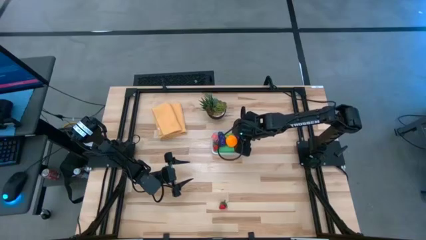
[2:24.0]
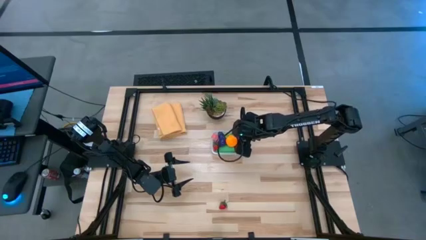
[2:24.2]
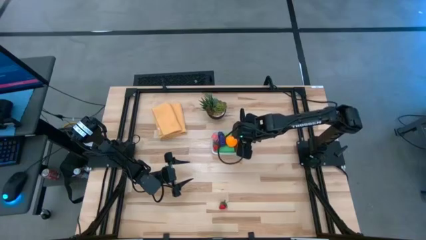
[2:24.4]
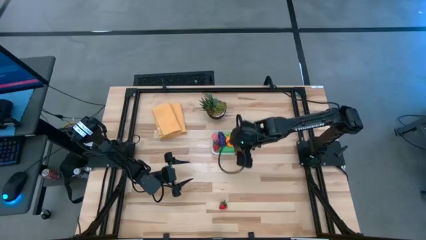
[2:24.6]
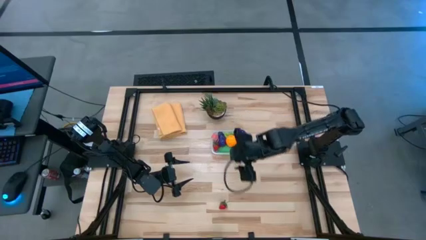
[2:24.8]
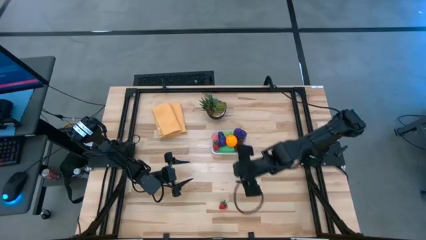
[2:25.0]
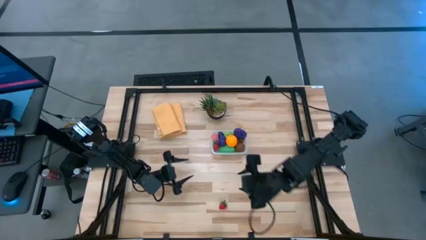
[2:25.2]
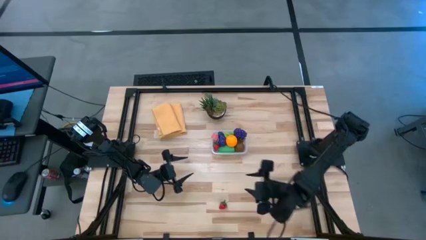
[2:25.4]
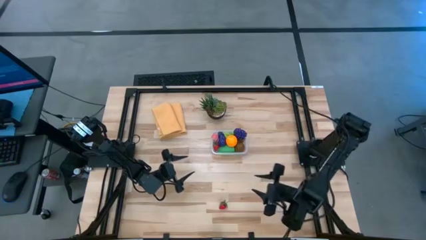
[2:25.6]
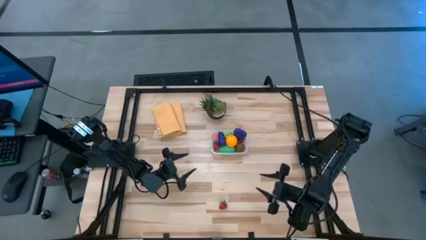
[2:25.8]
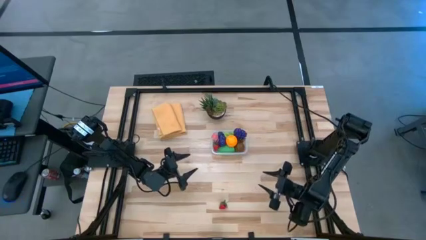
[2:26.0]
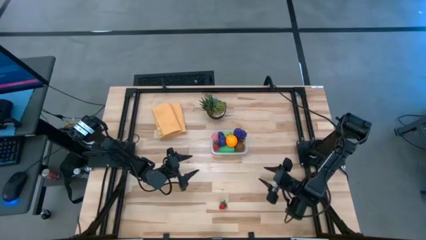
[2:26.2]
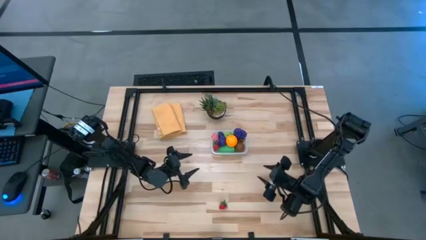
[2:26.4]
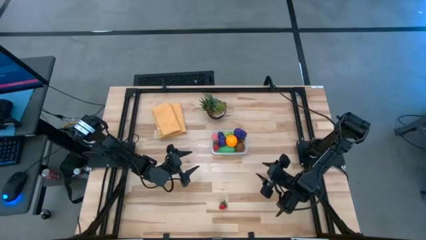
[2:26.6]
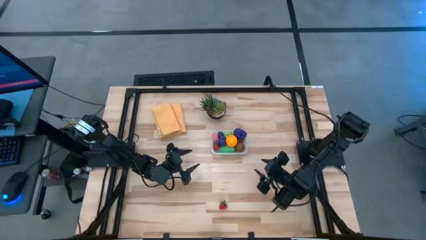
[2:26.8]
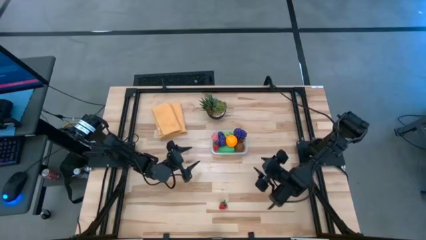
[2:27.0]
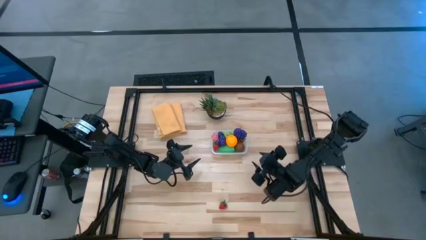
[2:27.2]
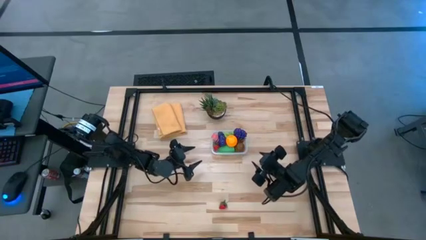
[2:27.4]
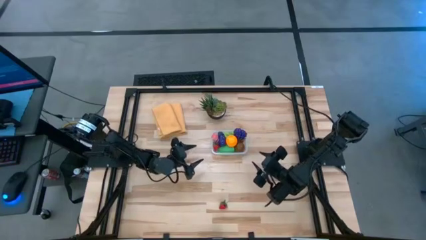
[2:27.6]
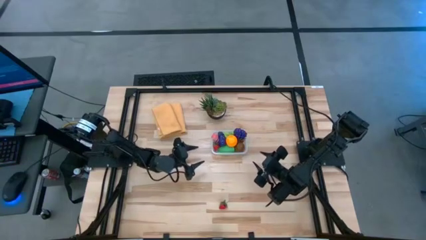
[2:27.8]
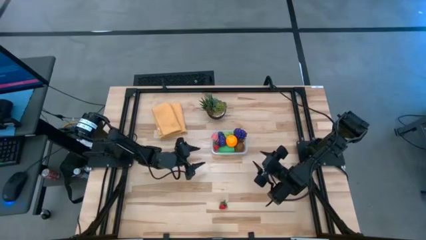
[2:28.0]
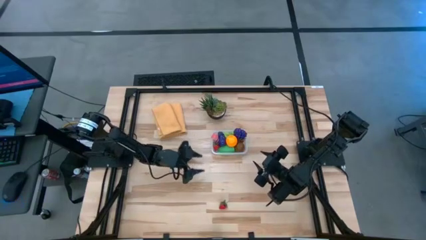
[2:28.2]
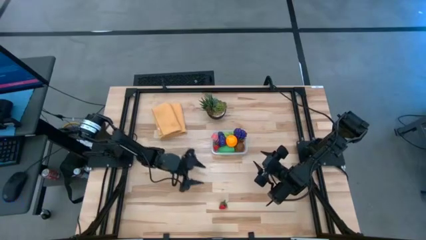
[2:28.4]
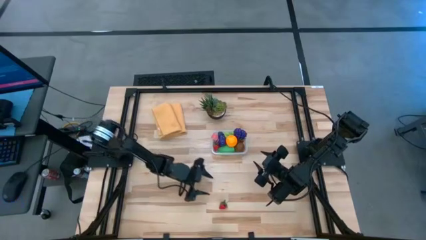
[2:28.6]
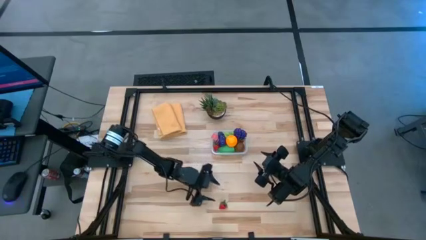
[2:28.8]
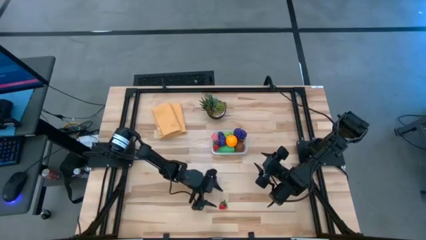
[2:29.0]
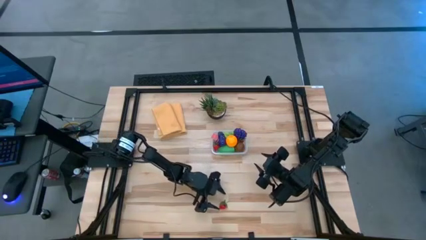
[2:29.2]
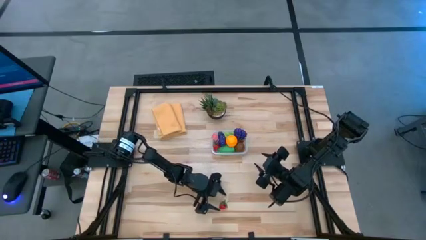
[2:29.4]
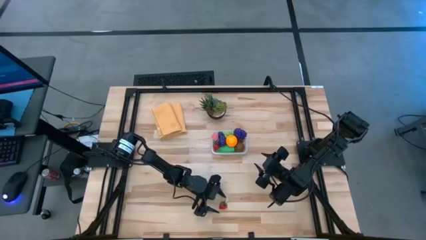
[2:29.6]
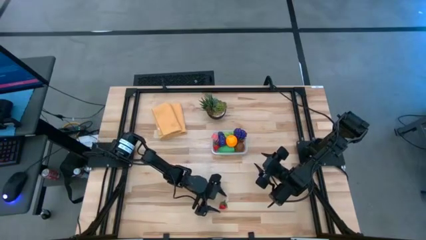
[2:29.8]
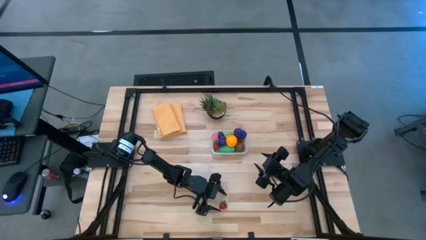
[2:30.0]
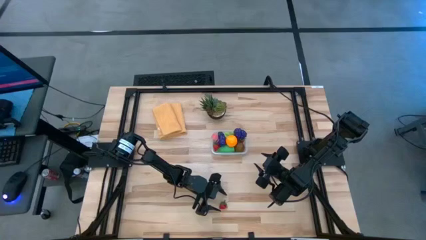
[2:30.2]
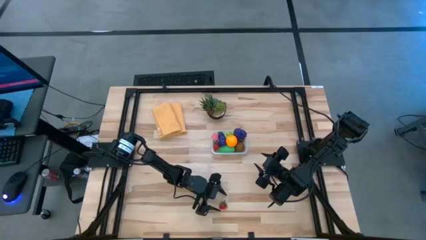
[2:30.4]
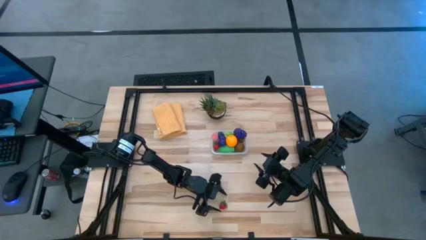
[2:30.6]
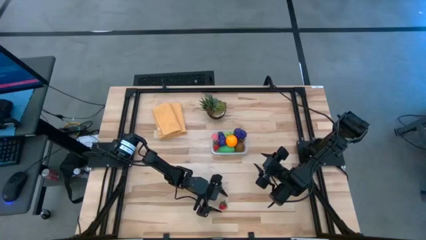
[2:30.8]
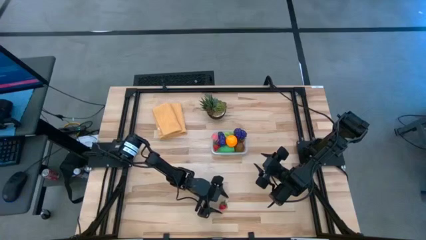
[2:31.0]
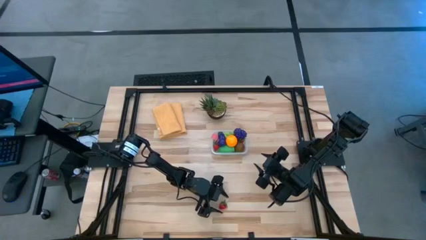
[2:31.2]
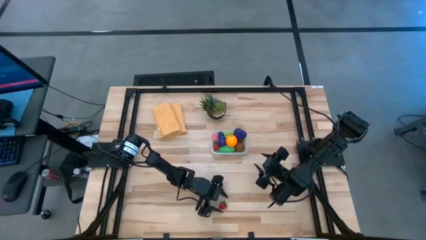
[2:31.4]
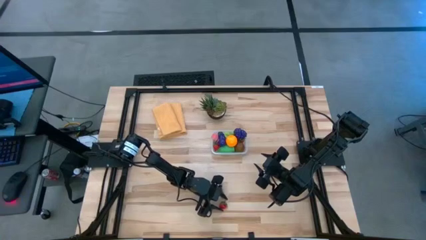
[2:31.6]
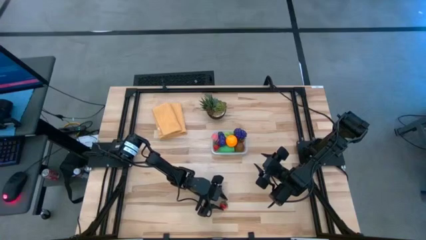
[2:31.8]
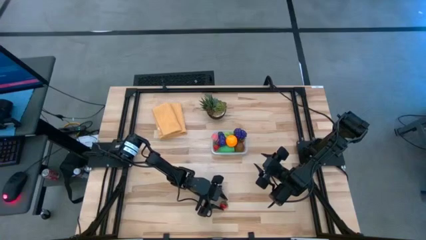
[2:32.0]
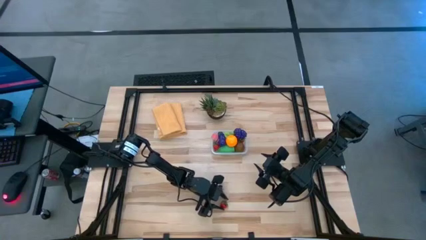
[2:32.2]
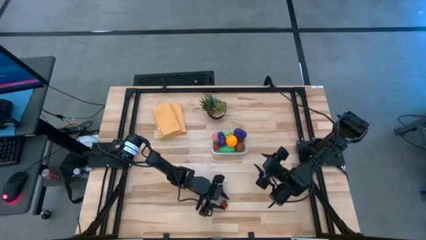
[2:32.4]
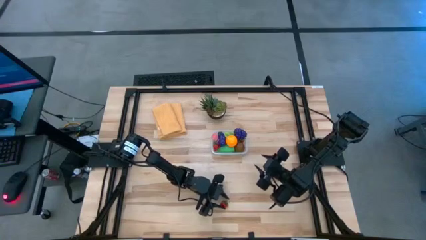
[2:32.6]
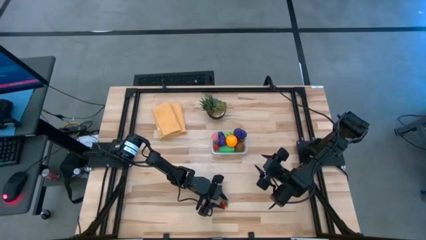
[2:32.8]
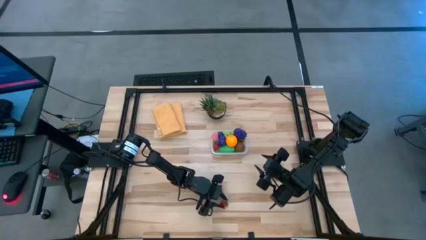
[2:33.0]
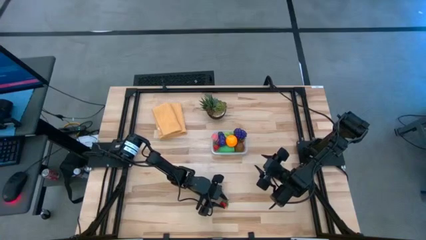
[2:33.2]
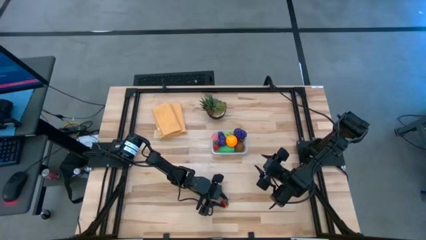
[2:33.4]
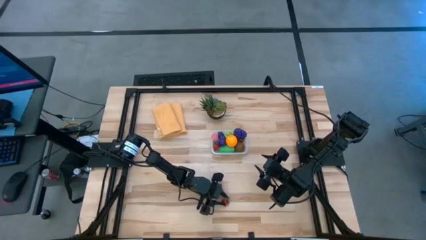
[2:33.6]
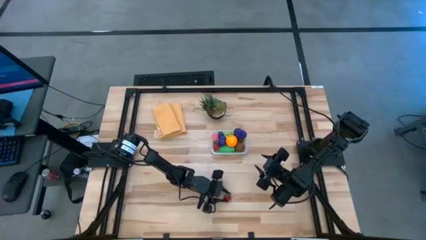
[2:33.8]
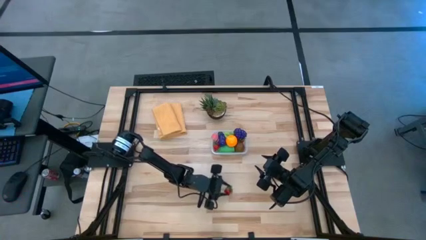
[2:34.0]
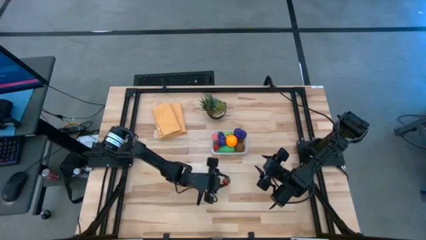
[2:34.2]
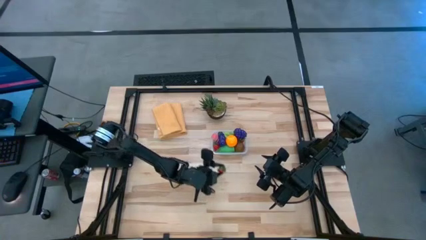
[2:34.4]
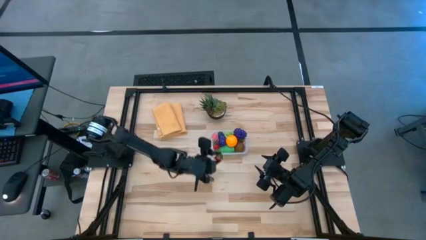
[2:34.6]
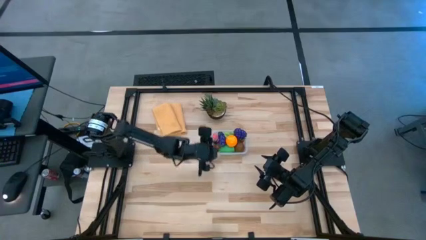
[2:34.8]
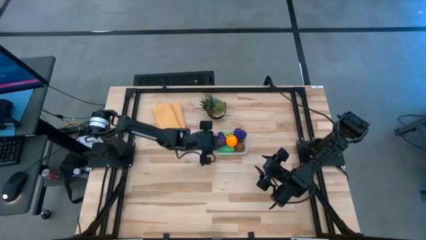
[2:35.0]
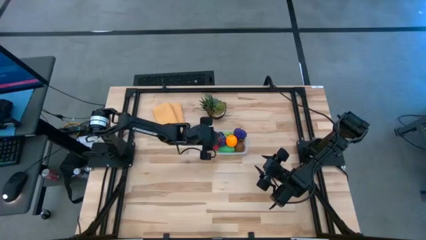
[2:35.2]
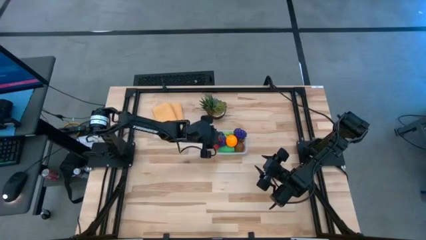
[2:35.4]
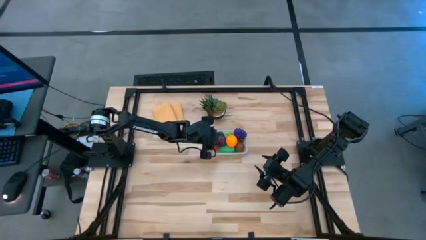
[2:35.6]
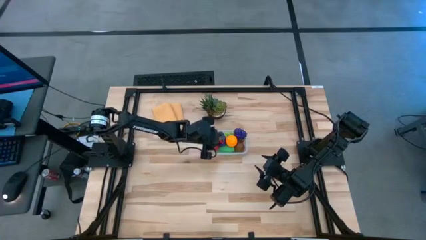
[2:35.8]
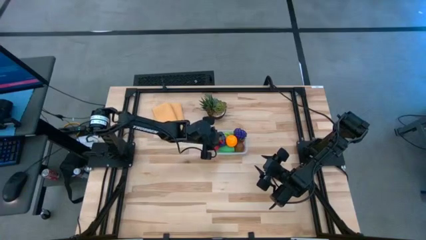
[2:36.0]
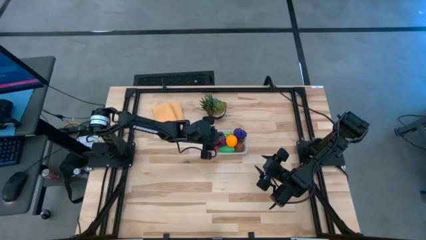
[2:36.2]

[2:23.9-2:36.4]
Task: Pick and placing Produce into tupperware
Put the red strawberry into the transparent container

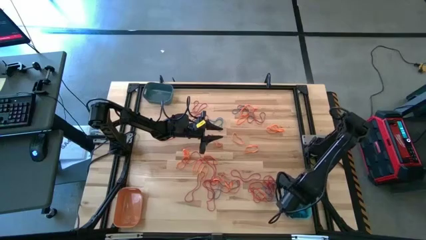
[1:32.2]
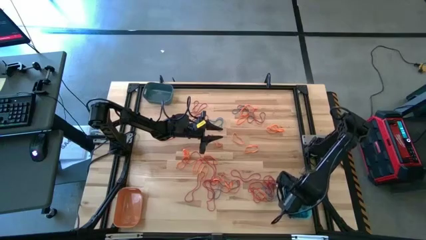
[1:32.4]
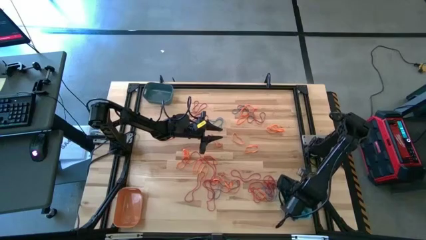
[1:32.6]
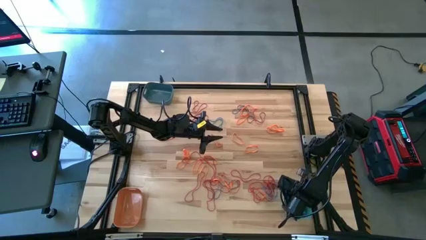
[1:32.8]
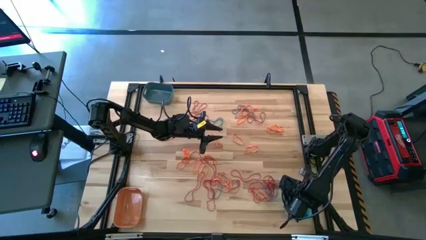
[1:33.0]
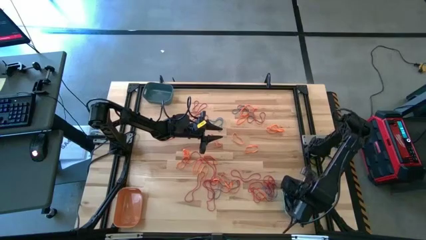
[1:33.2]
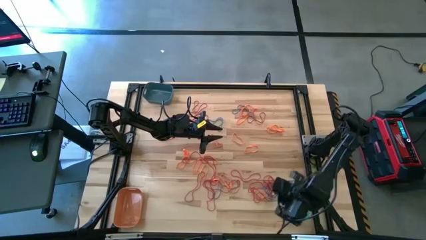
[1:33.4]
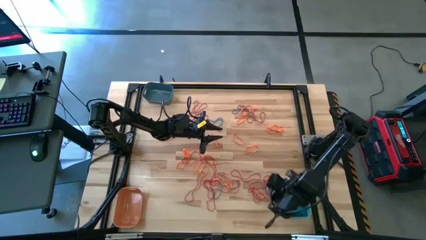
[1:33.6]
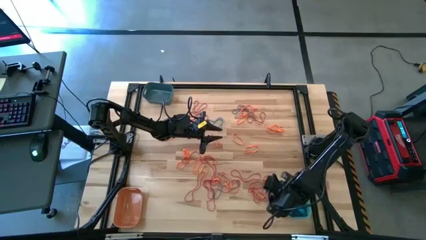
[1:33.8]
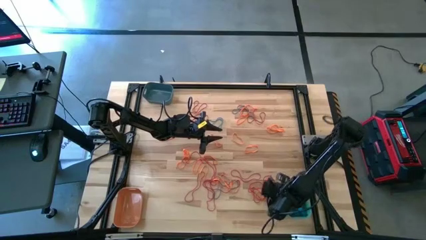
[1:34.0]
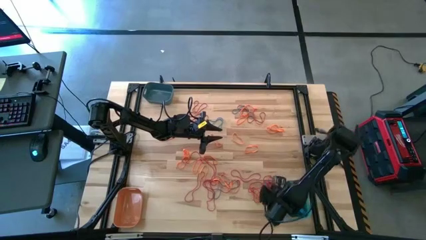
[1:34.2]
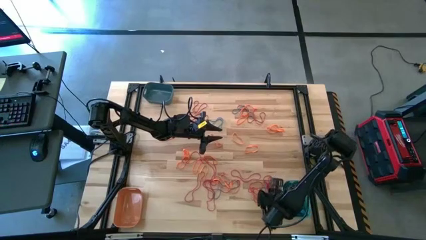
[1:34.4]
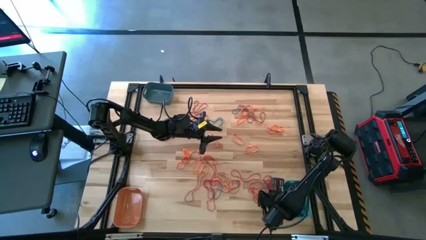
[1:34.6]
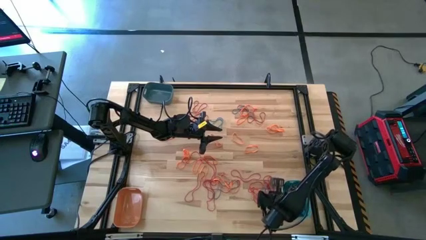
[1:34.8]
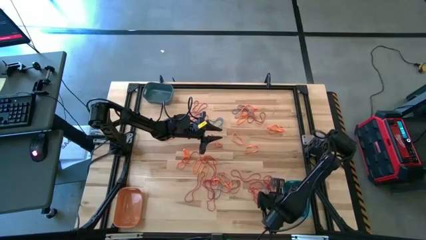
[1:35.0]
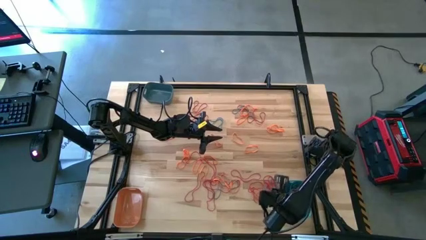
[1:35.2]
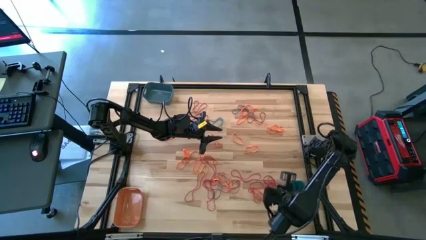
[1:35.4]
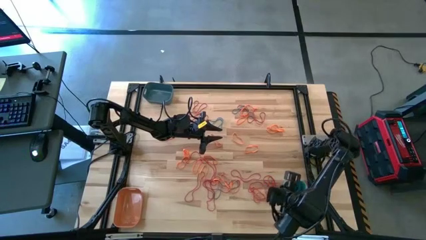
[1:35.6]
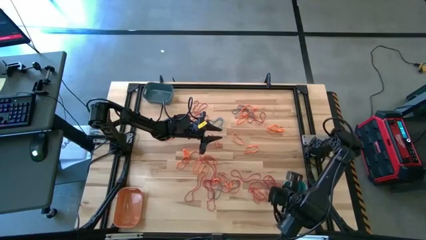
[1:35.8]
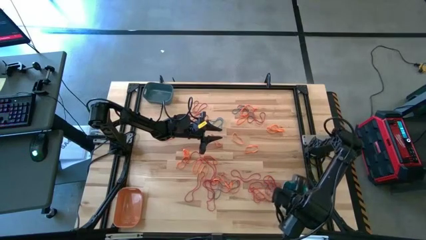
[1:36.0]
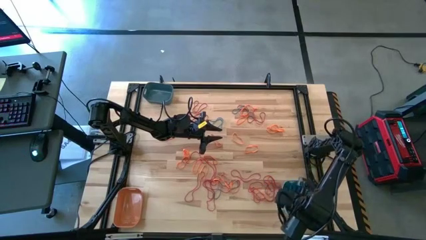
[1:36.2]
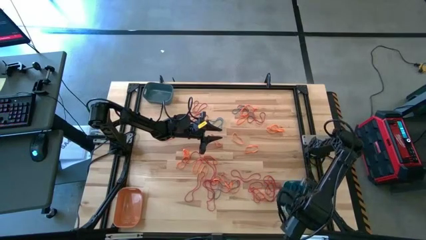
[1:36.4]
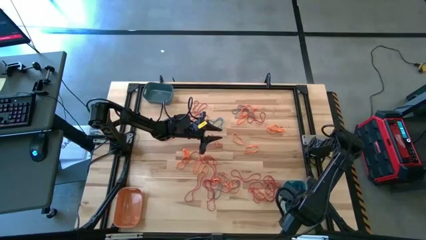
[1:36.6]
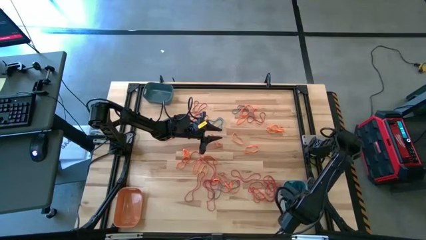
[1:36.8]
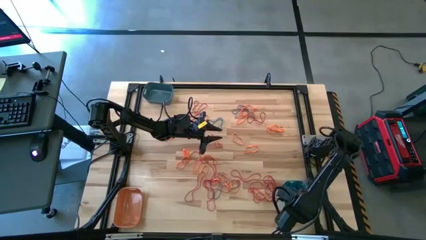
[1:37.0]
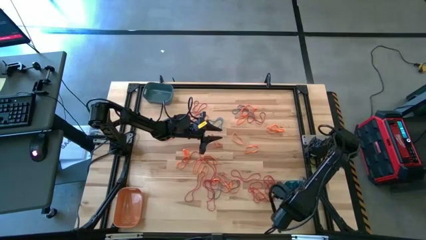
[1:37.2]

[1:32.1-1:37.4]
Task: Sort rubber bands into baskets
Put the blue rubber band into the light blue bin
